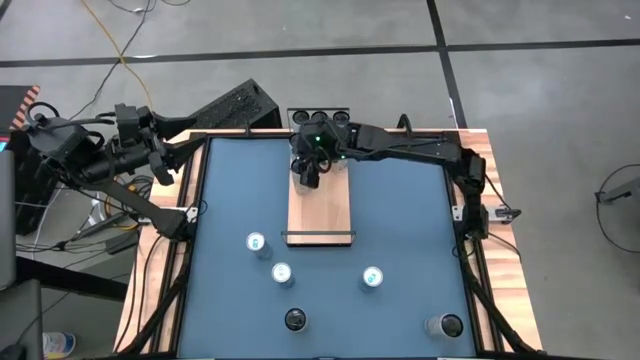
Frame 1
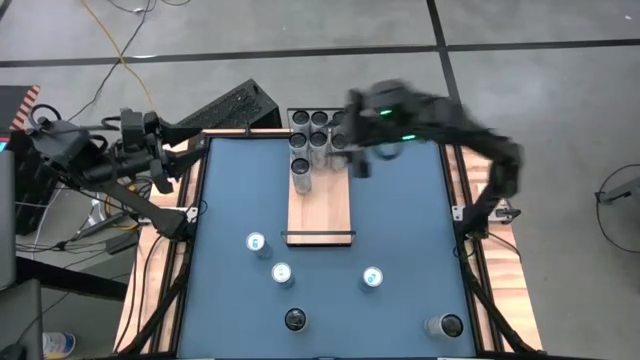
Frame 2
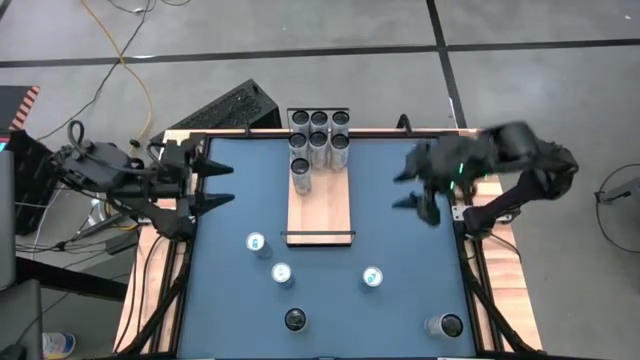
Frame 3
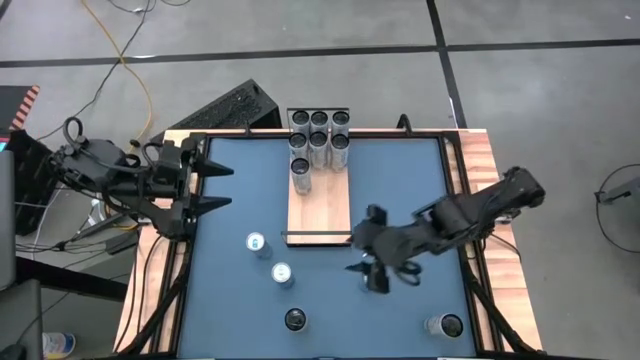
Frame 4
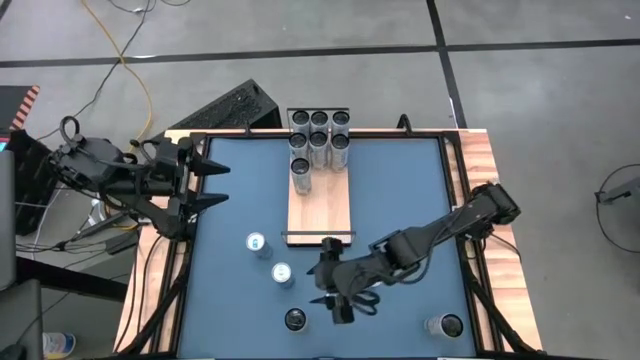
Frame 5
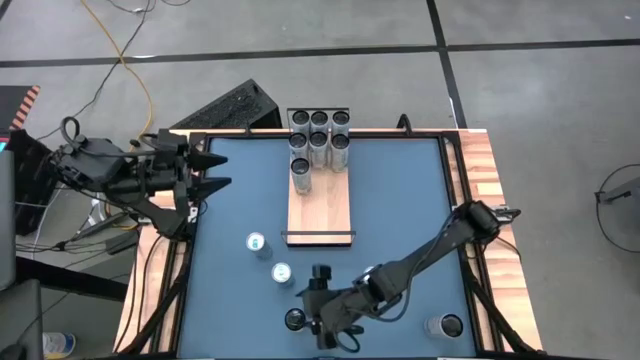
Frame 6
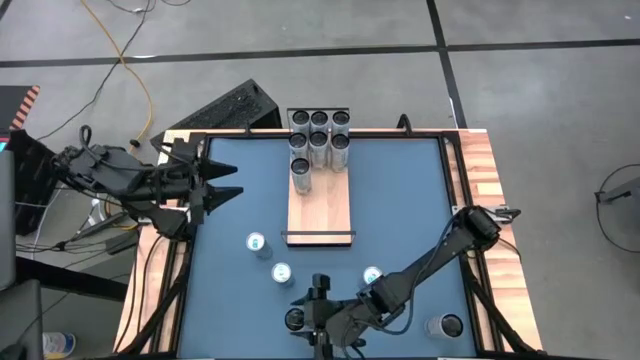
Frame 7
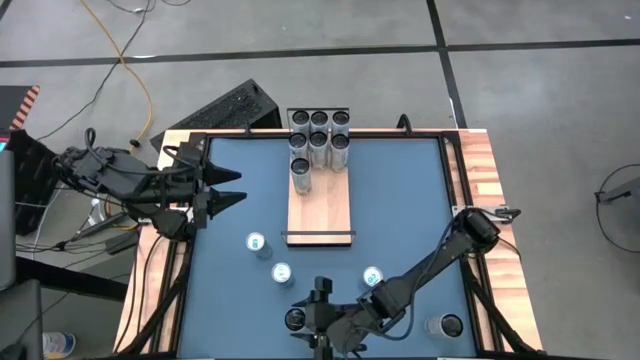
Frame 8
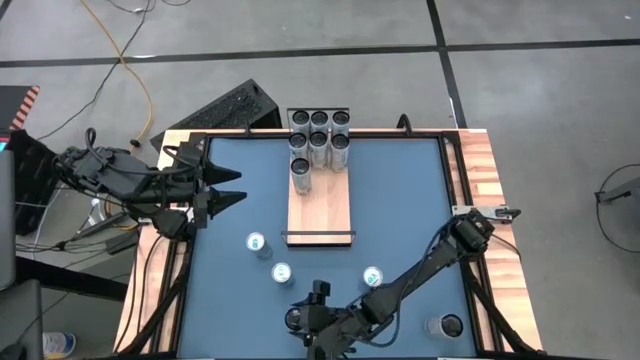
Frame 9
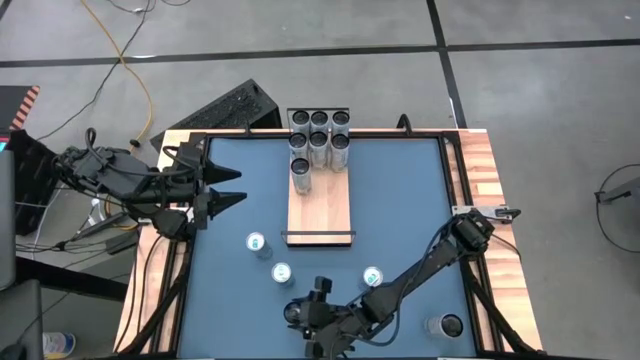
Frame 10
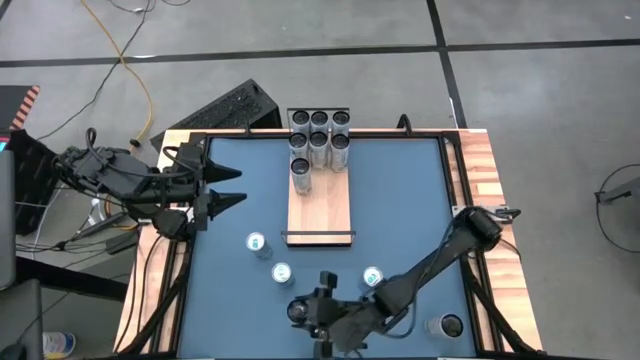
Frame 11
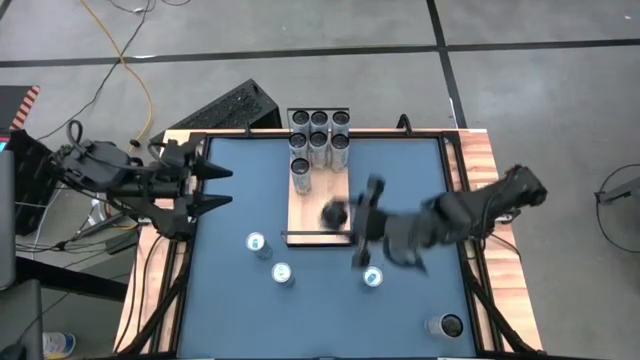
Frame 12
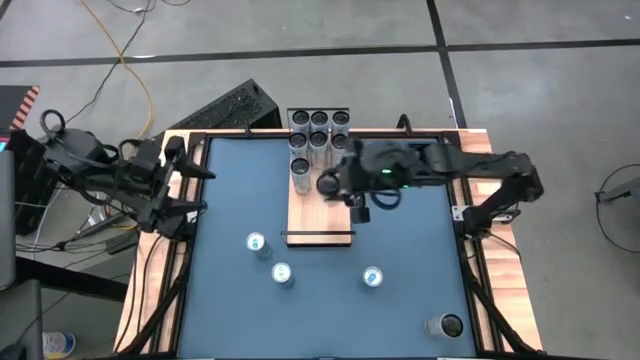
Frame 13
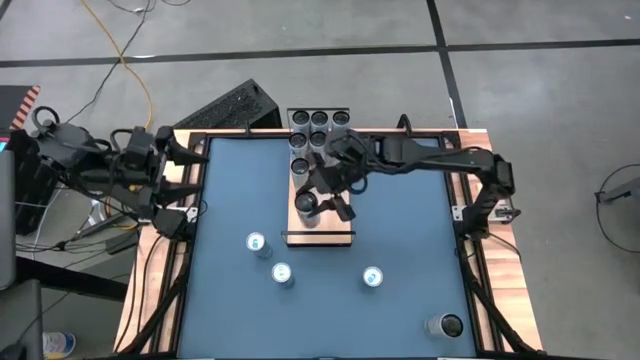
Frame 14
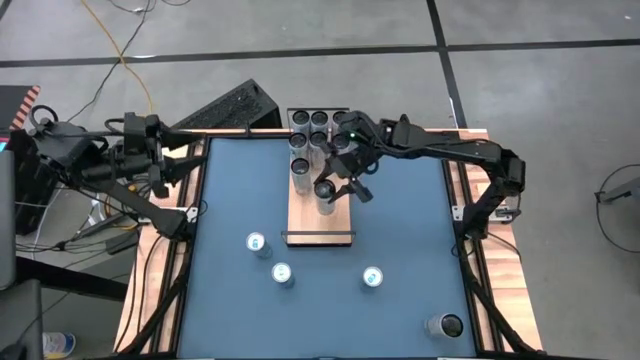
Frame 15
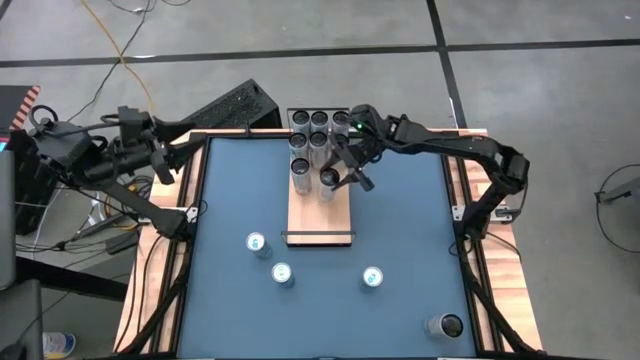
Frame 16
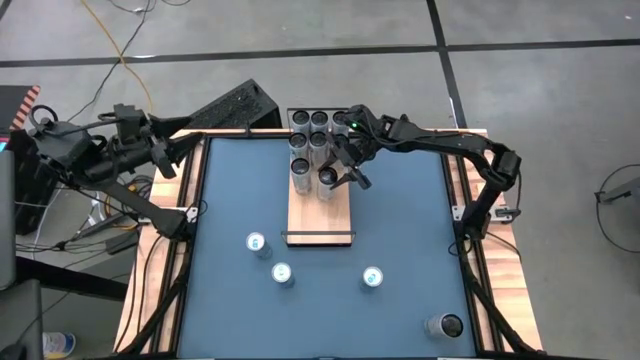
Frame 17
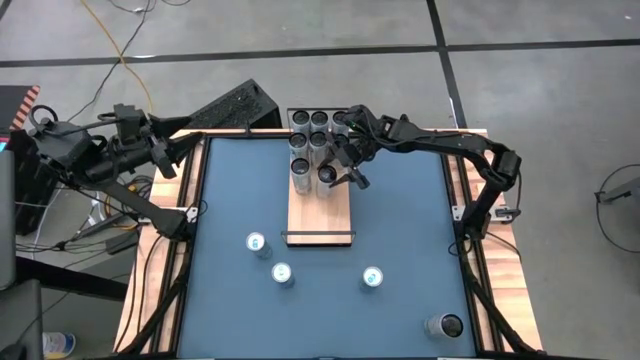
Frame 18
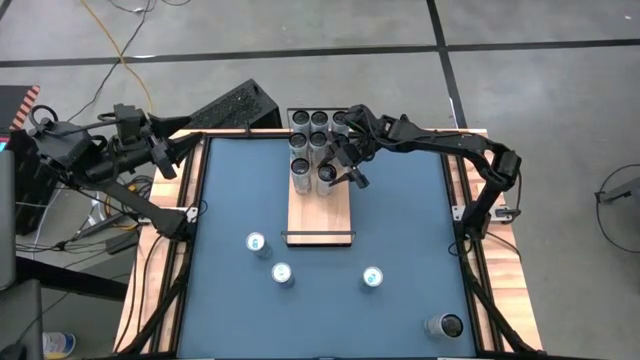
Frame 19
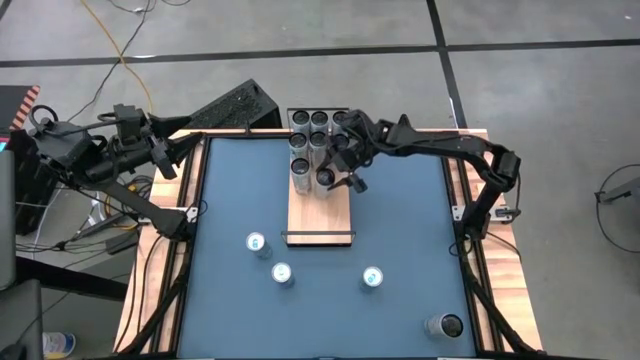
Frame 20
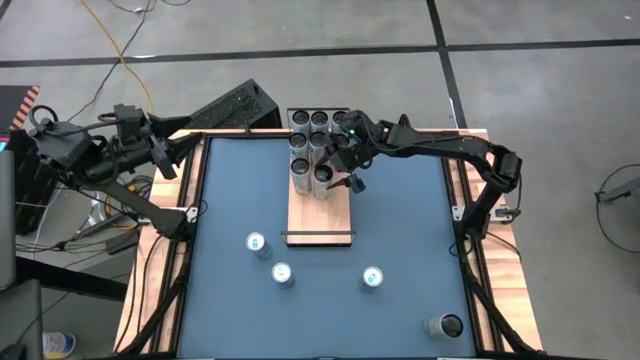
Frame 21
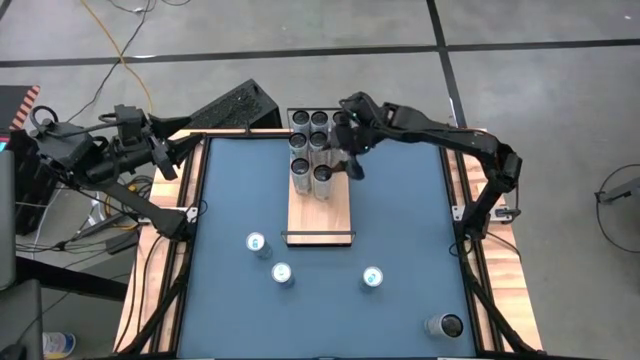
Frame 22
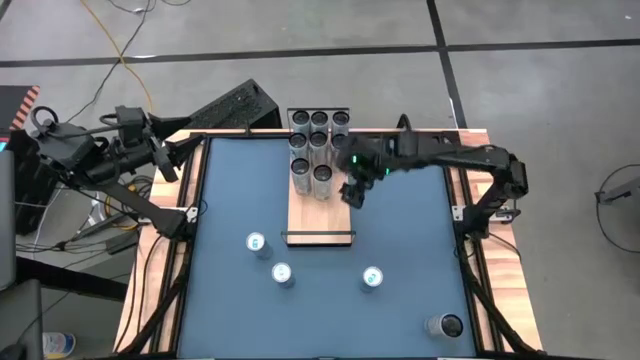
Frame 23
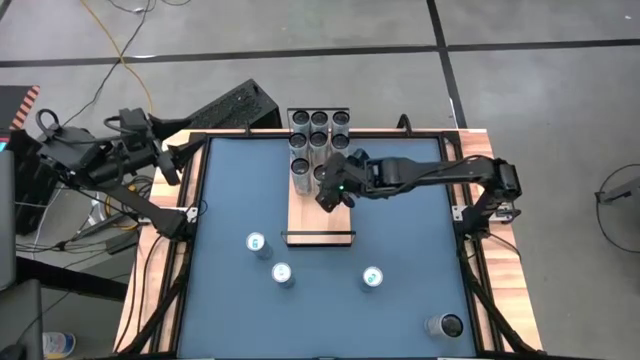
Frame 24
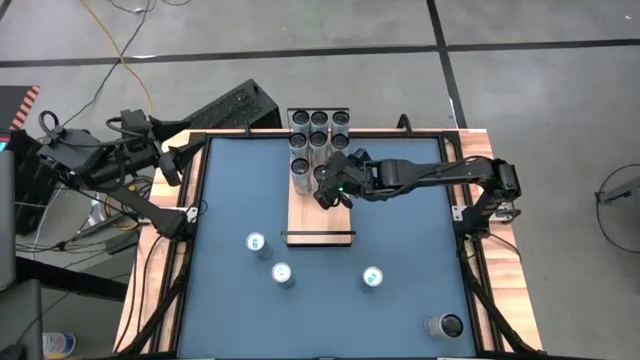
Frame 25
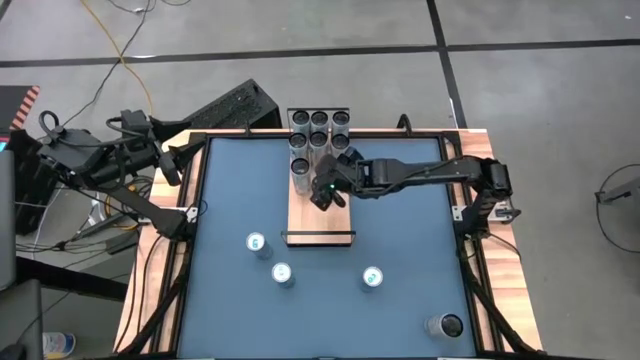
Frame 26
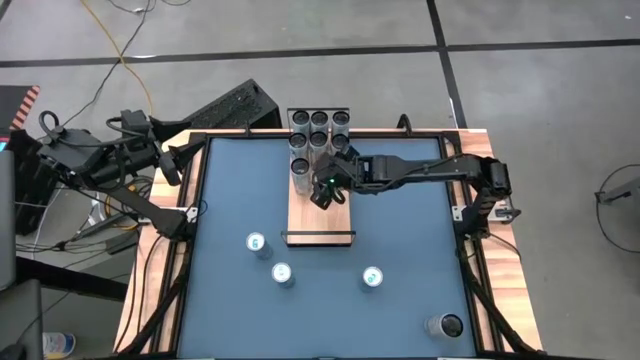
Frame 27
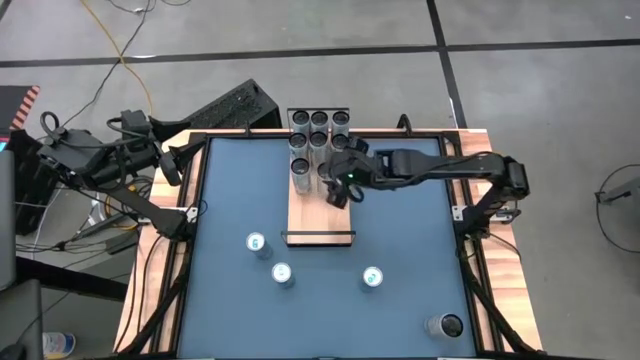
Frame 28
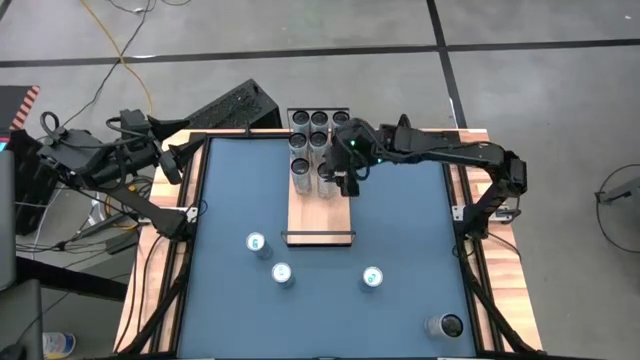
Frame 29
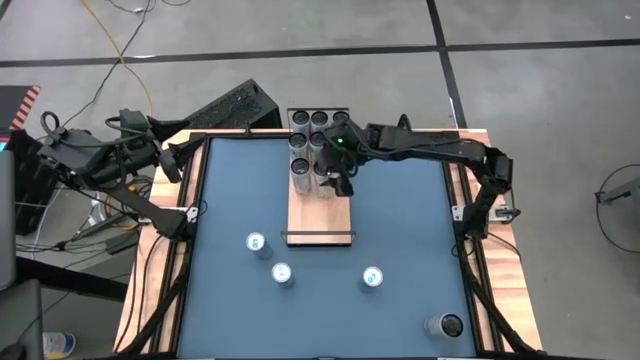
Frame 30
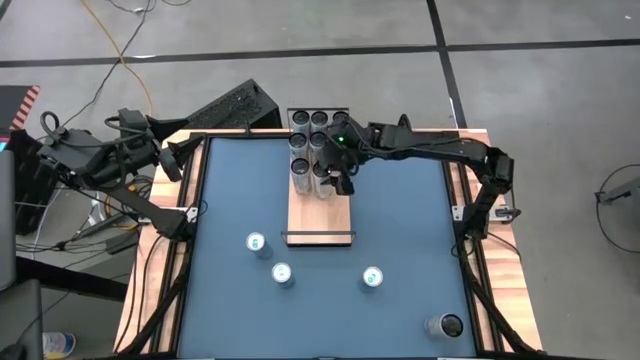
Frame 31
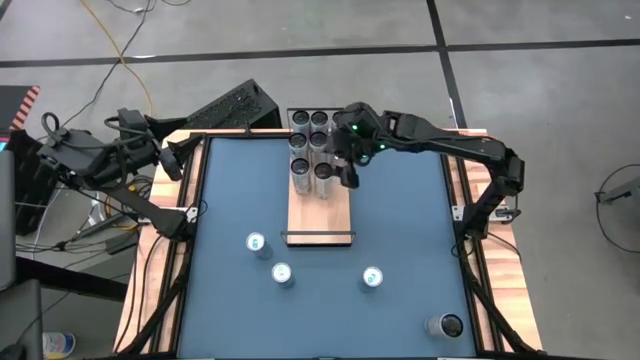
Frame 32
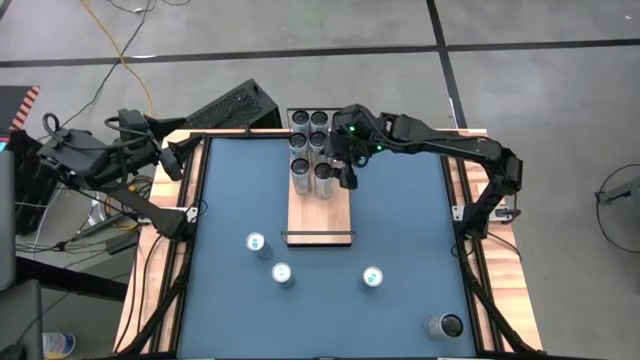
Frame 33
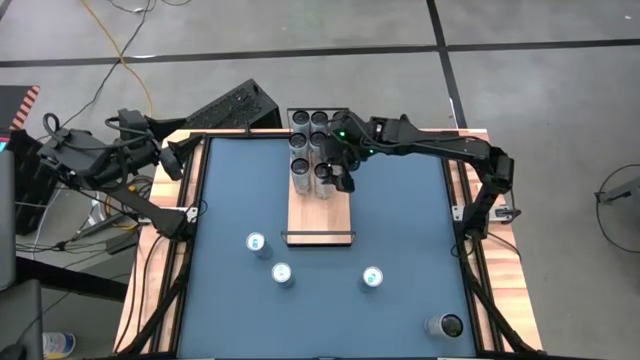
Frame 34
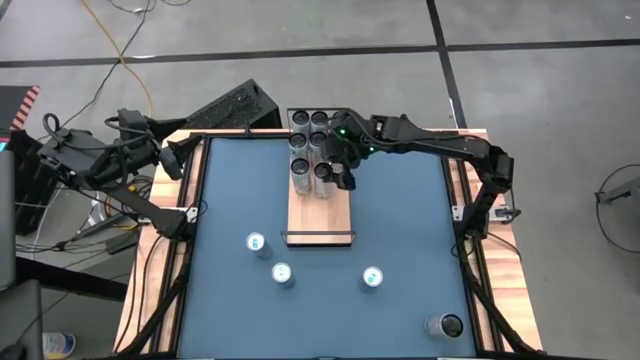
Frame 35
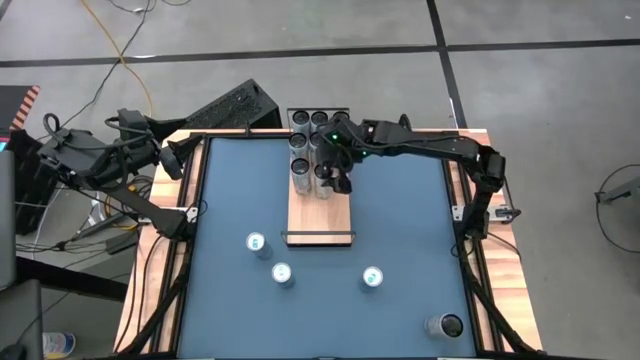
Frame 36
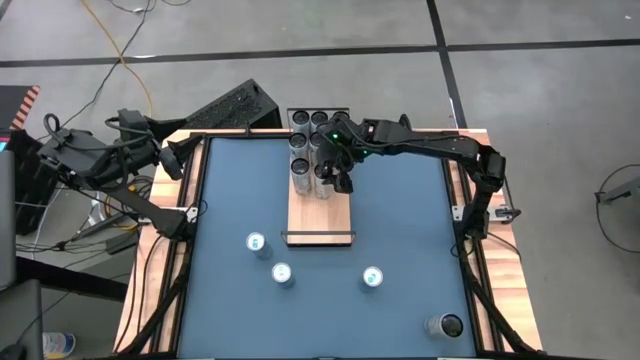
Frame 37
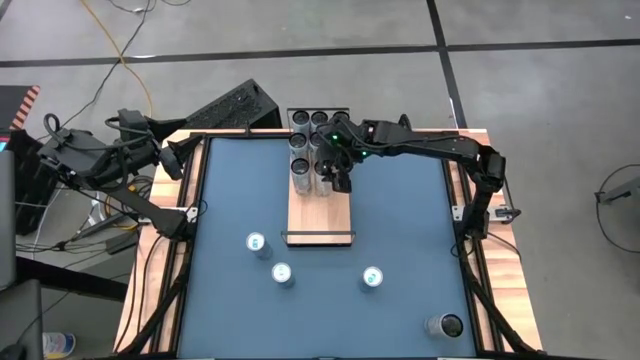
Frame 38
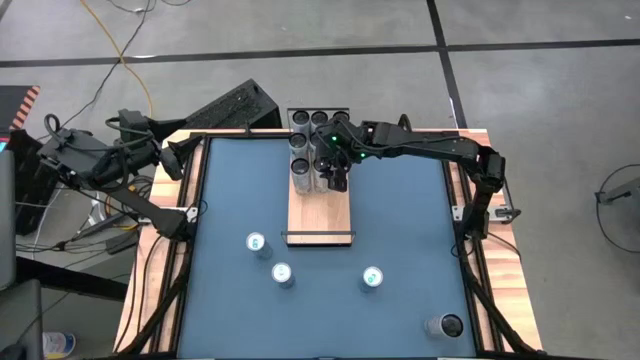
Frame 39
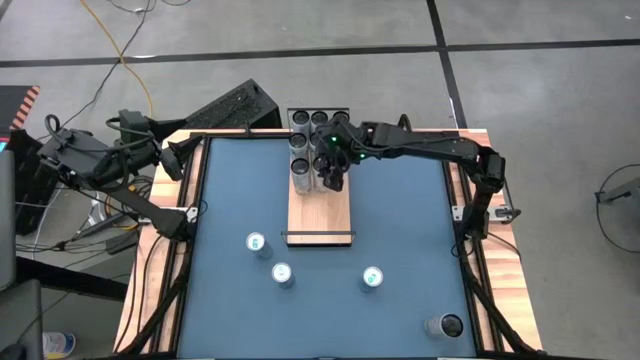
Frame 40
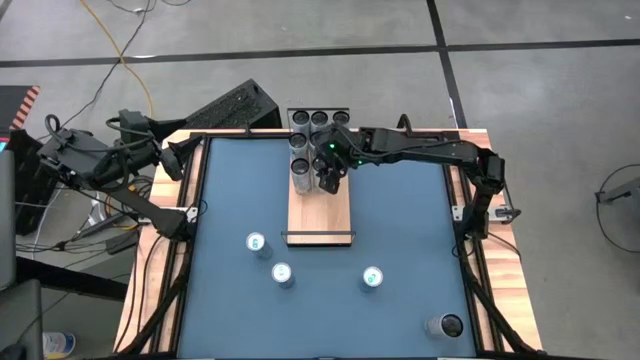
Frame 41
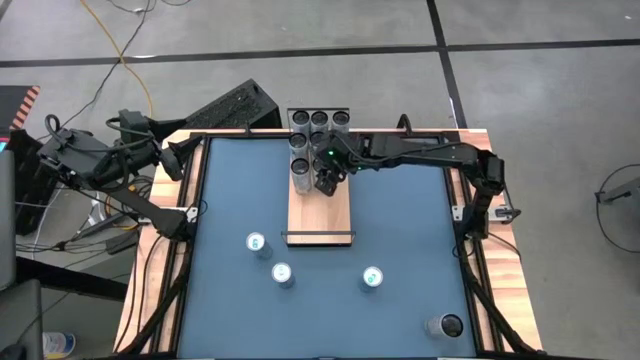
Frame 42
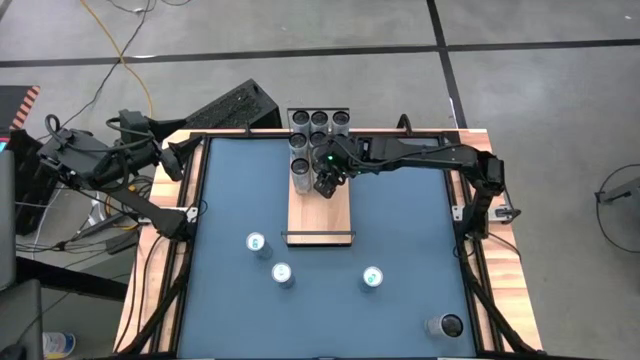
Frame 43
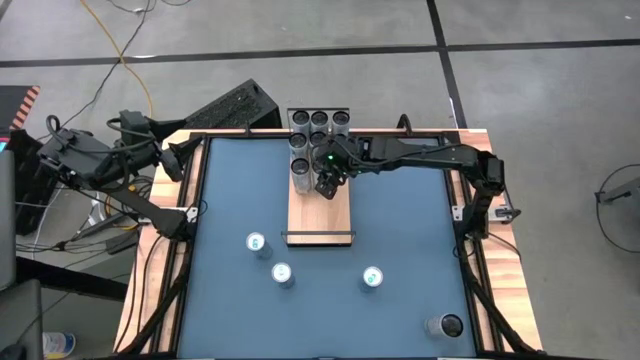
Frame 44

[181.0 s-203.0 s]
Task: Place canned beverage on shelf
Put the left white-yellow soda can on the shelf
